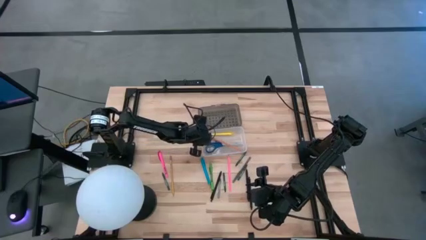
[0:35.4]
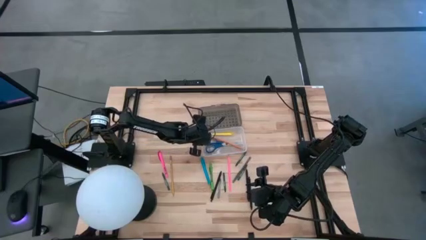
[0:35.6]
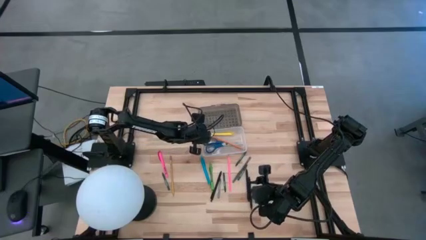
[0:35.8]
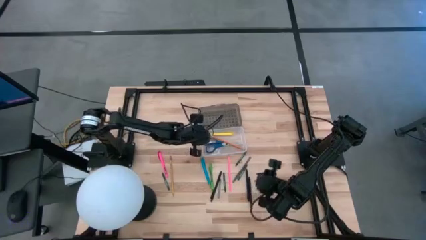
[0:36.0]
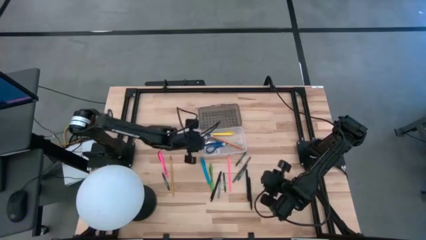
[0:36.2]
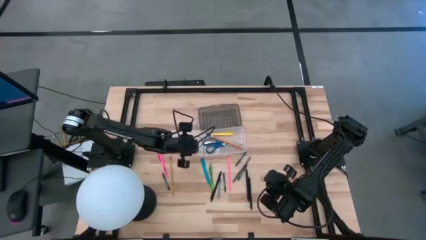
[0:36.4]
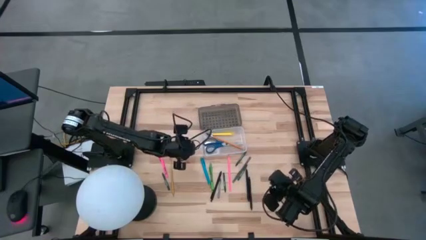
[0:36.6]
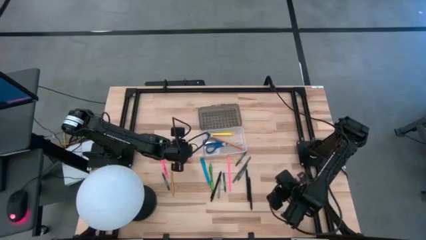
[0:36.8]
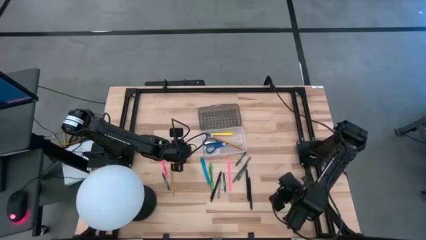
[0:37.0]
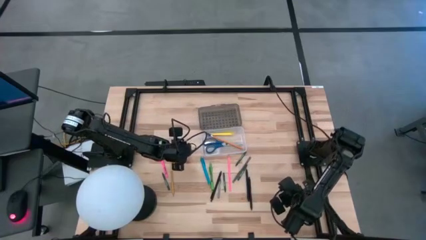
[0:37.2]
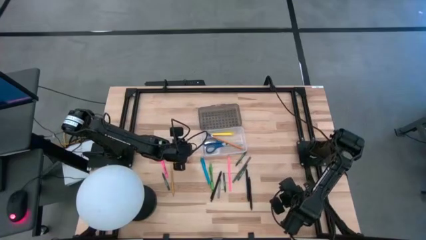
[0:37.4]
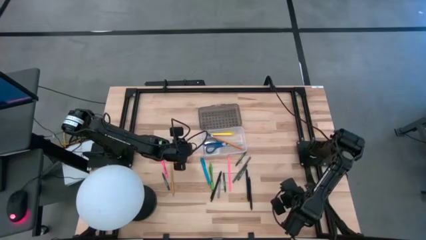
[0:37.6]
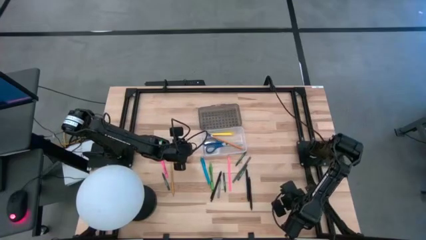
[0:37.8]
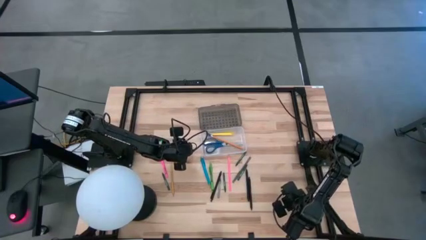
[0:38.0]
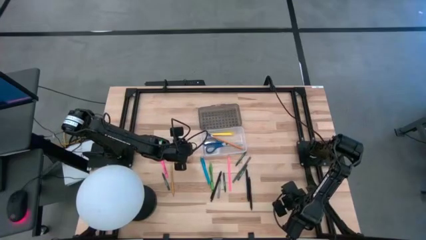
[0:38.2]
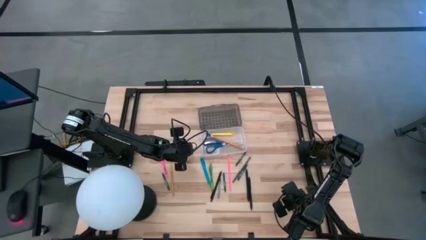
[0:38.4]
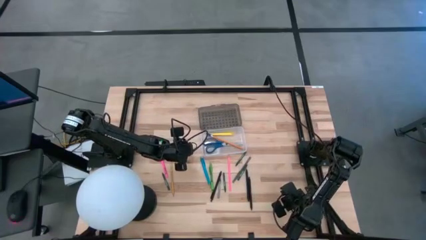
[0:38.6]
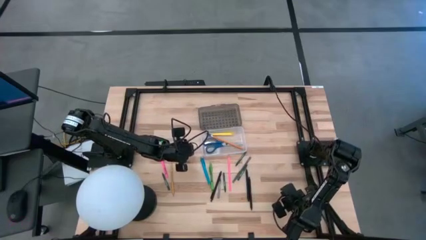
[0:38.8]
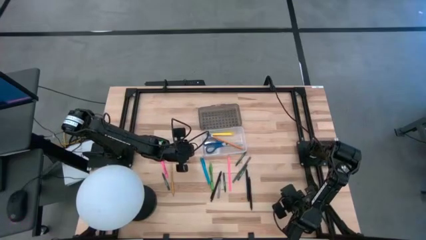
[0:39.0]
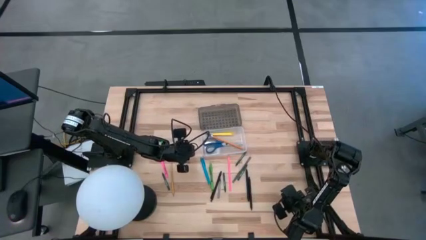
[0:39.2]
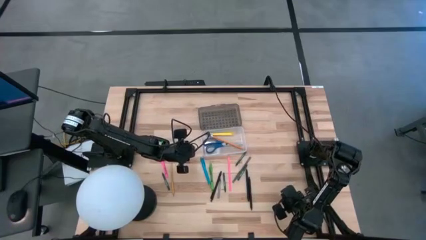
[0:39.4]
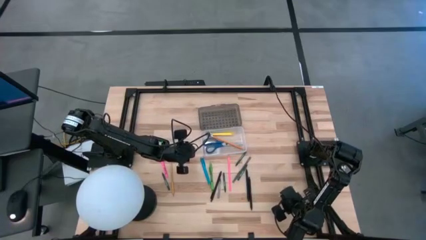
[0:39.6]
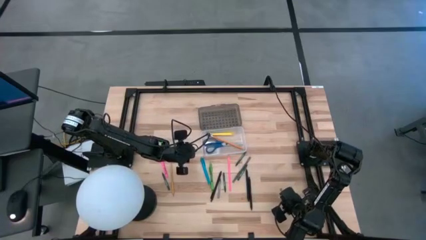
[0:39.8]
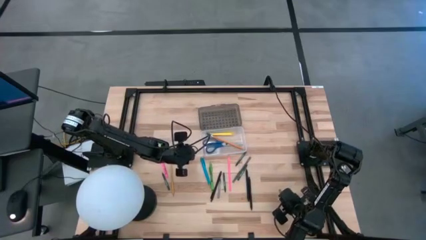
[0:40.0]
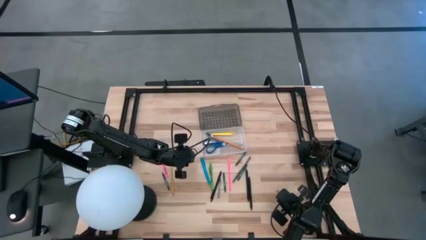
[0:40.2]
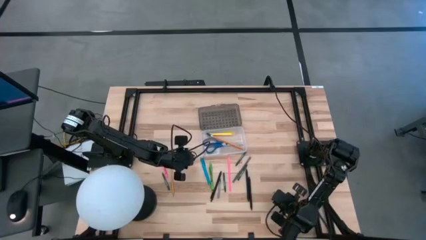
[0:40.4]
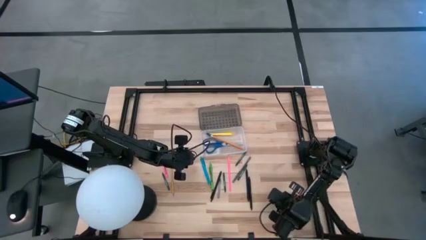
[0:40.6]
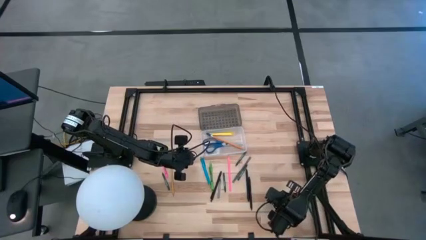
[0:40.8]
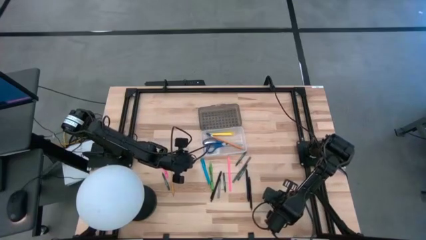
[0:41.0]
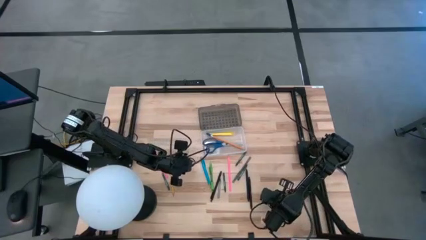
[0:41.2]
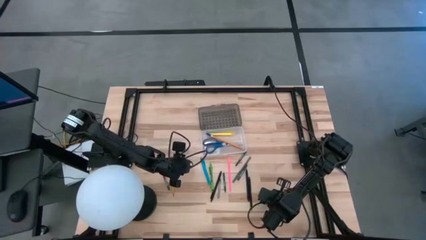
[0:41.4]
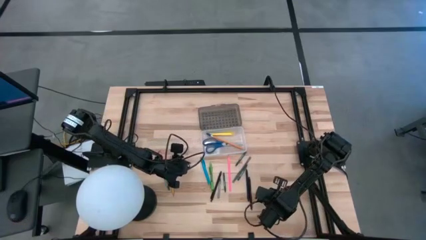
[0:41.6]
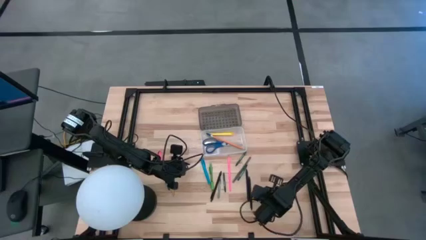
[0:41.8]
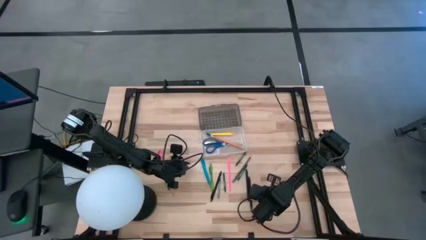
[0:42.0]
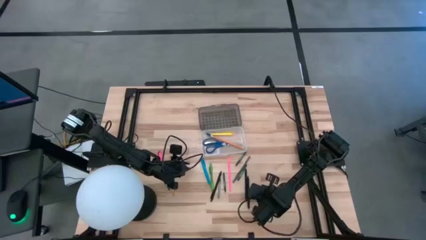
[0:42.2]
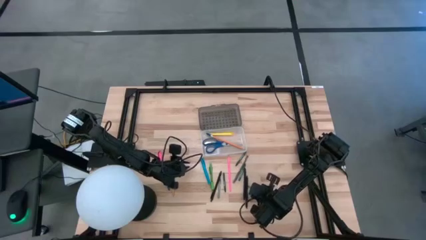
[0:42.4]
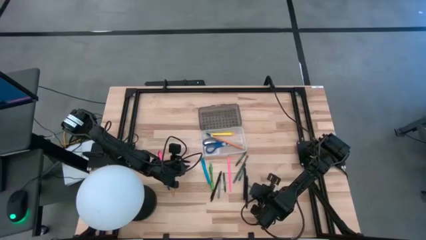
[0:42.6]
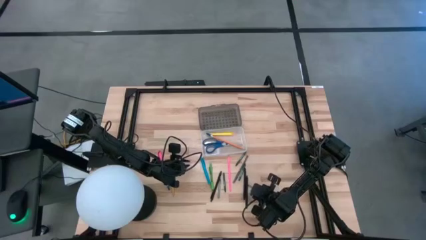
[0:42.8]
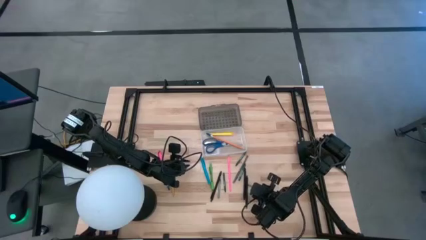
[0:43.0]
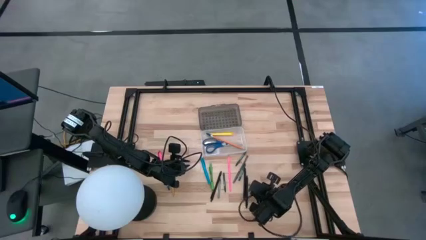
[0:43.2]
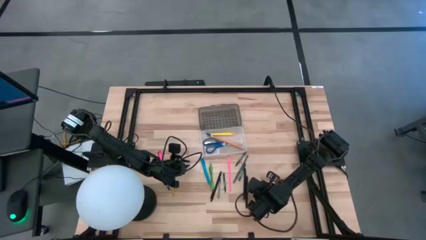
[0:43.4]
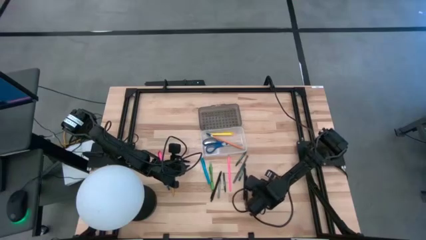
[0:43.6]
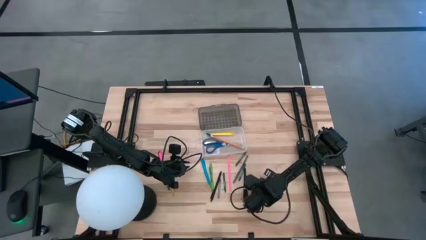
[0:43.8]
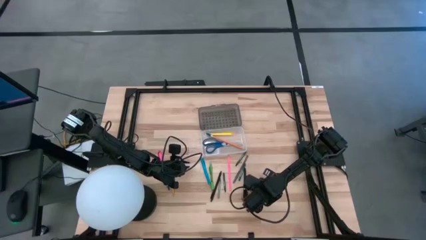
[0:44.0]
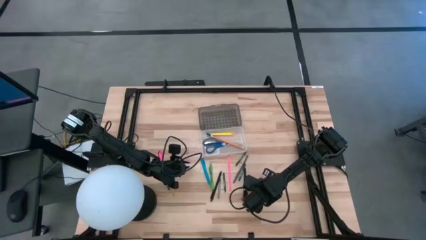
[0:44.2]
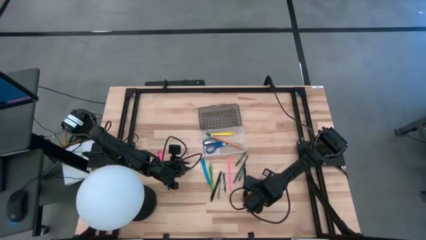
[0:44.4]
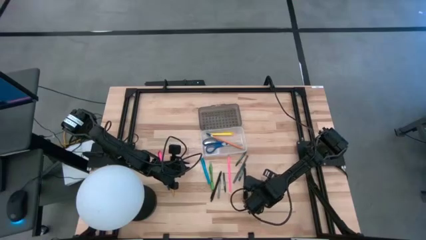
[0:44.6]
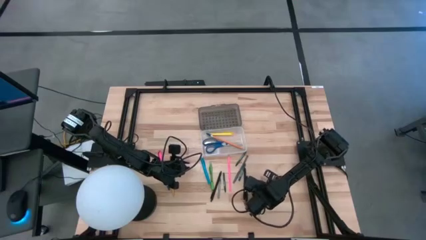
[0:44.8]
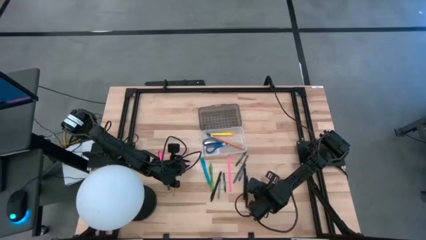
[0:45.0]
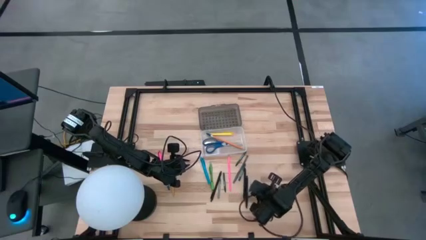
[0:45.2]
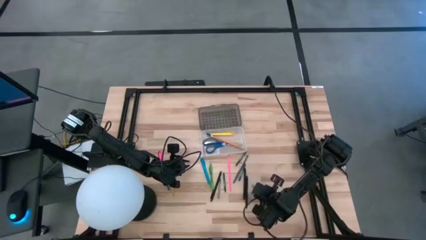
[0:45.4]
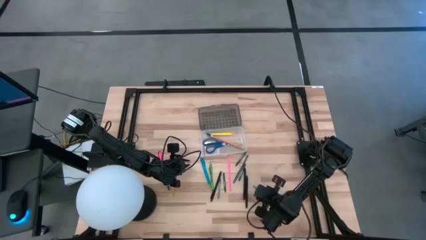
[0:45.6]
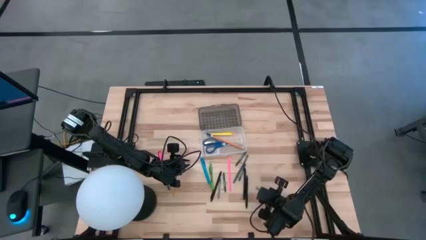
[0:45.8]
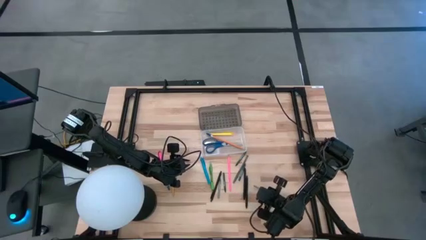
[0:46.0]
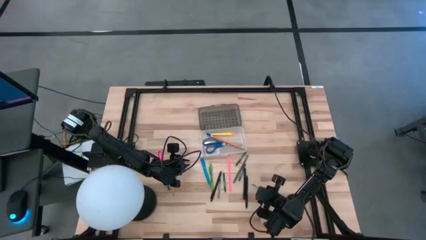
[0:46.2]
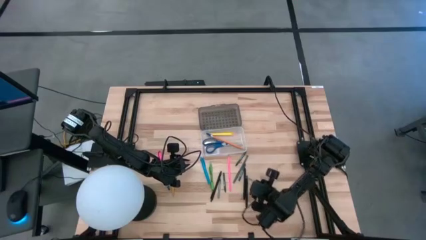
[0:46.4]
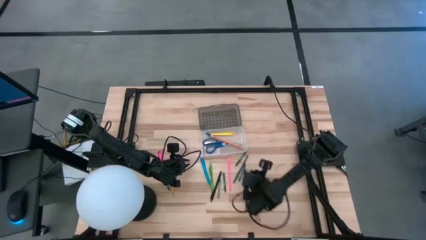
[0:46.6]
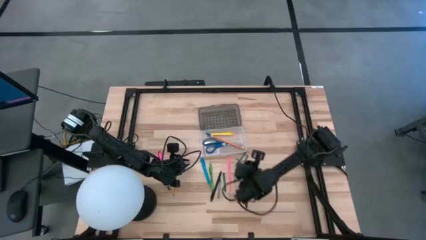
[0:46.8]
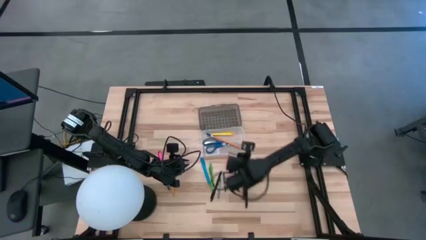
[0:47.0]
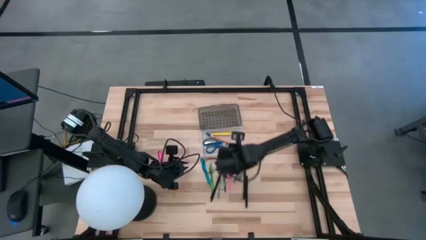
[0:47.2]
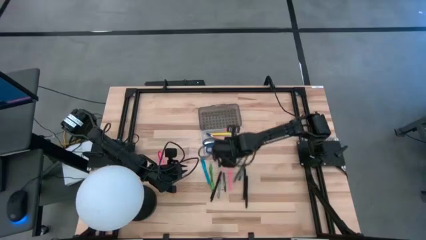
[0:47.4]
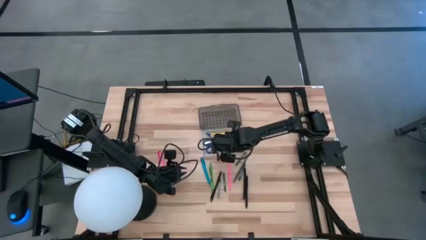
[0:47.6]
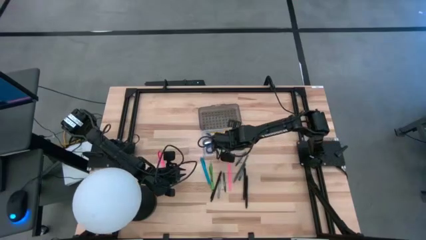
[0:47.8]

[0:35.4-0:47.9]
Task: Pick & place school supplies into a supply box
Put the gray crayon into the supply box

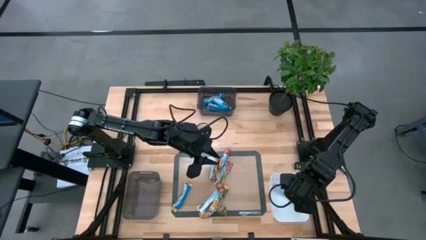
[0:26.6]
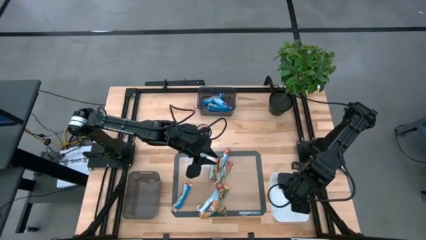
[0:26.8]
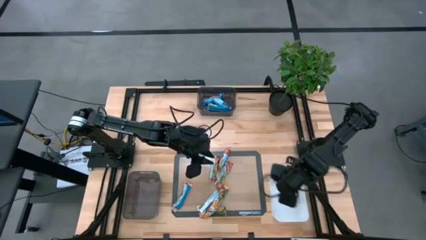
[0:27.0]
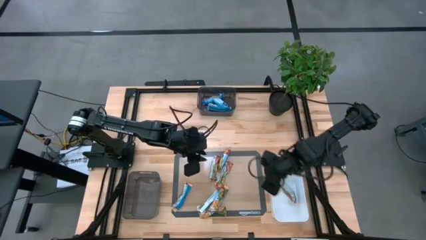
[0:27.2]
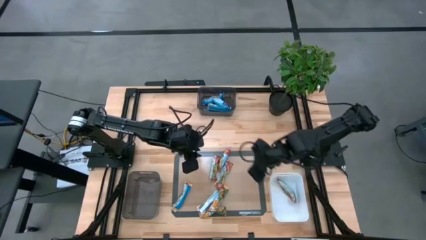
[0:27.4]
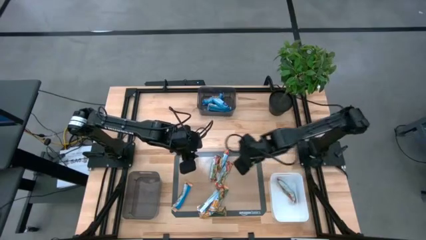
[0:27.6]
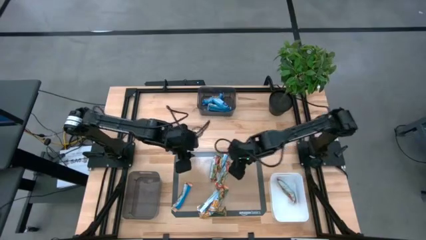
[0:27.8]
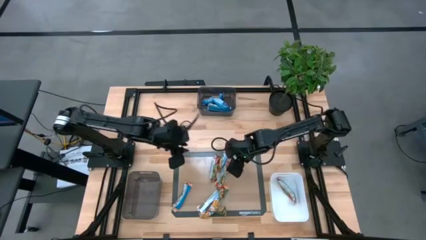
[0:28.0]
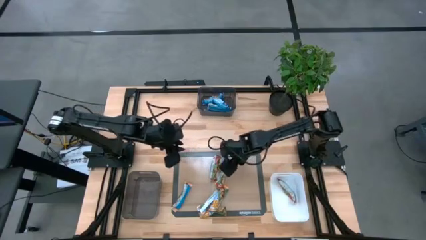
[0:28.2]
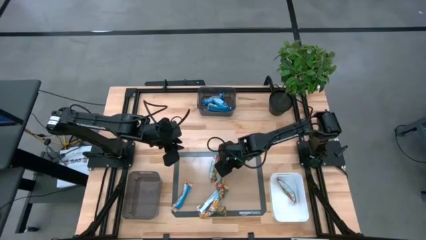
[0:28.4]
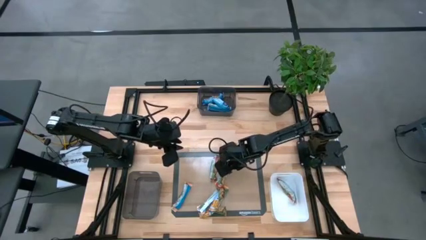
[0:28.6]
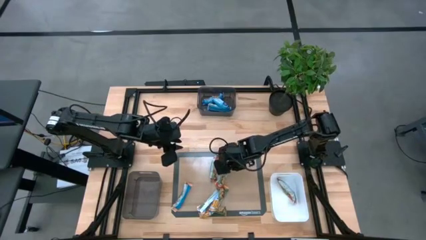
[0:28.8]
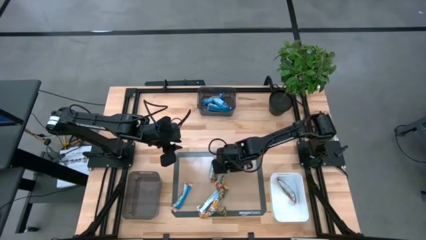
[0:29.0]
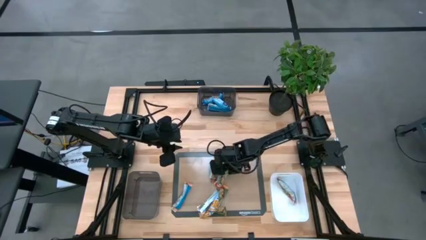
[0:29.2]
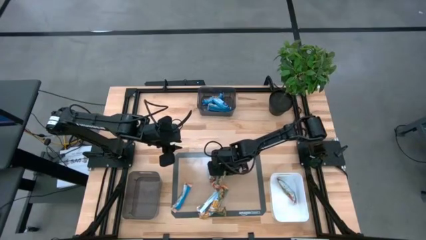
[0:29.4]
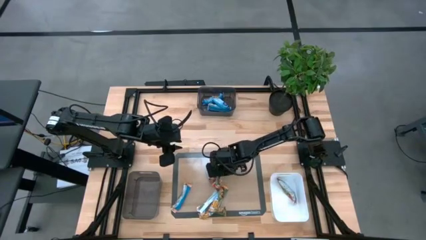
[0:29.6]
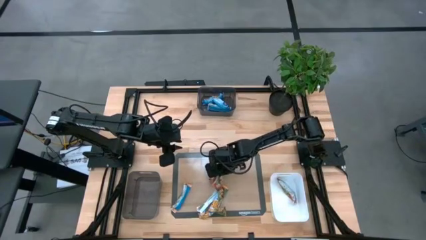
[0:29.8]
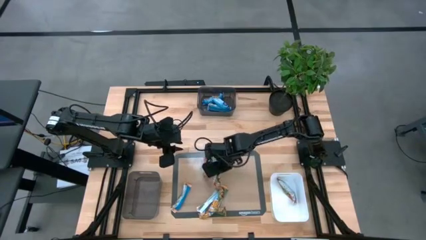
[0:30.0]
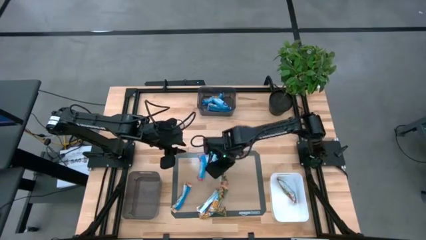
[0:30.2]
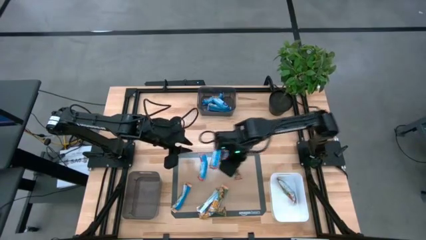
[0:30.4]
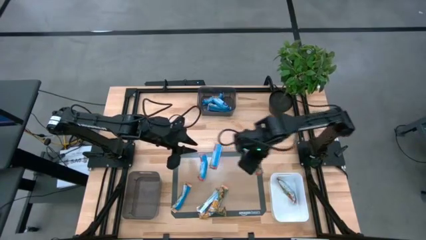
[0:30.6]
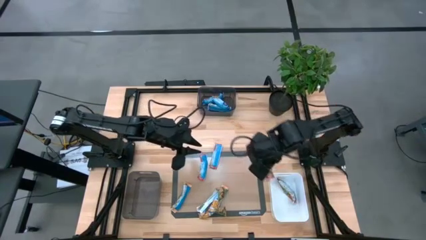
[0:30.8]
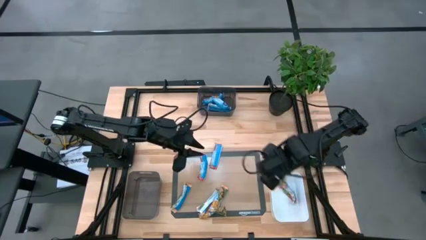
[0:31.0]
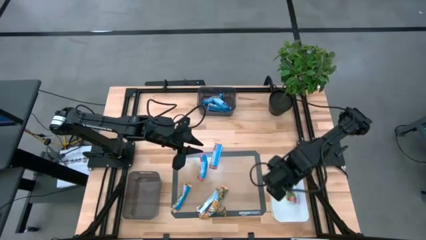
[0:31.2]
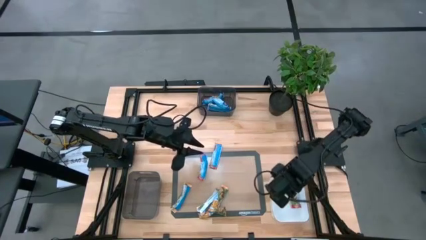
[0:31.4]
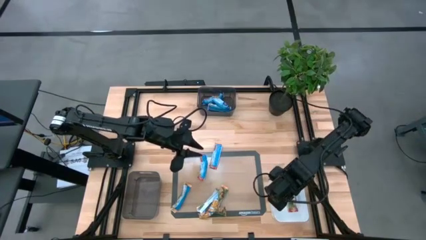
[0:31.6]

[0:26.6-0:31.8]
Task: Pick and place Granola Bars by type
Put the red granola bar into the white bin
